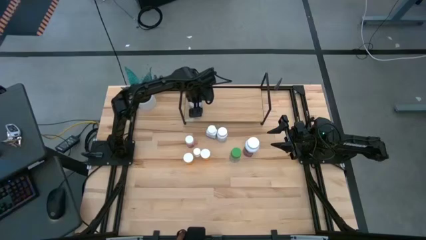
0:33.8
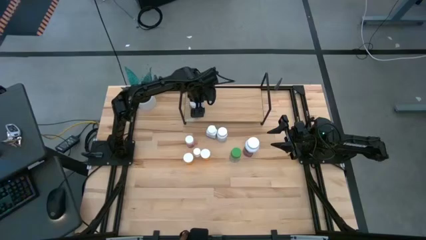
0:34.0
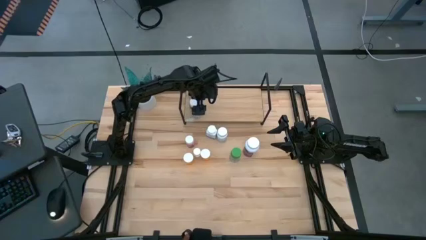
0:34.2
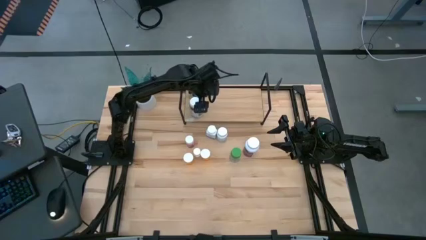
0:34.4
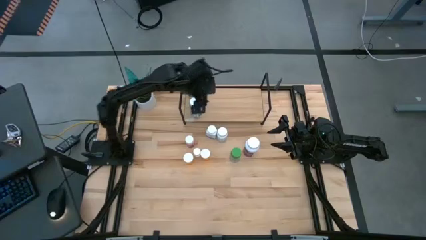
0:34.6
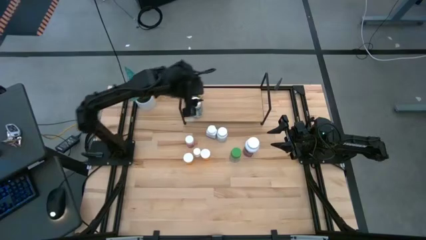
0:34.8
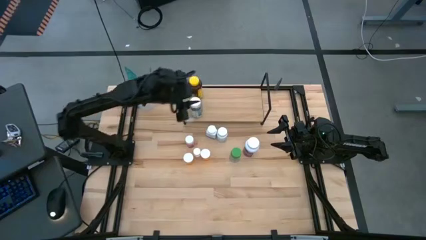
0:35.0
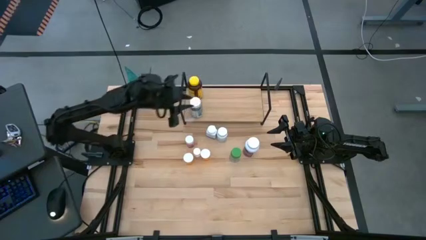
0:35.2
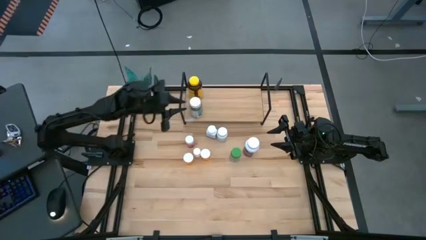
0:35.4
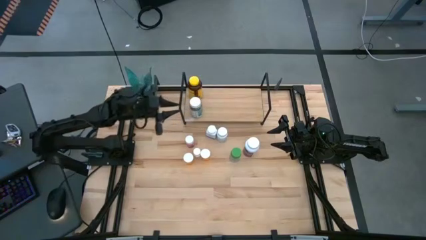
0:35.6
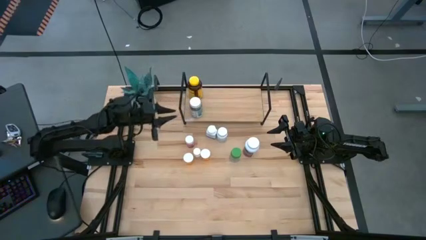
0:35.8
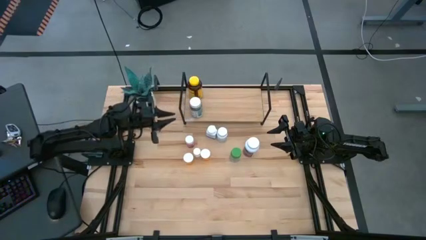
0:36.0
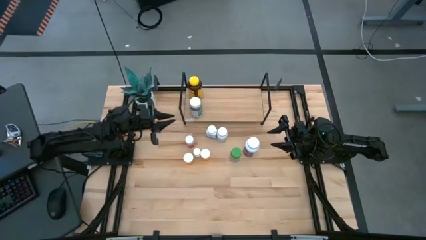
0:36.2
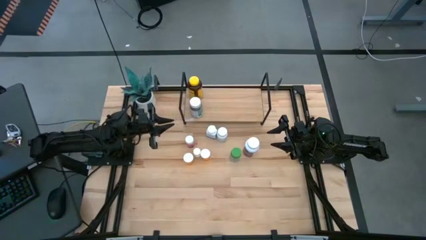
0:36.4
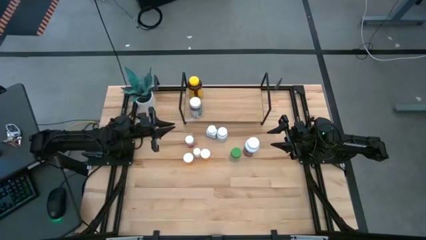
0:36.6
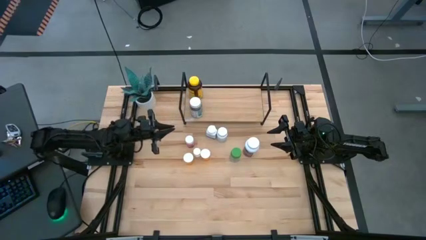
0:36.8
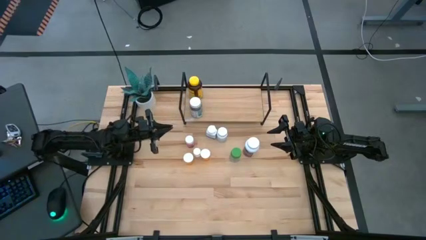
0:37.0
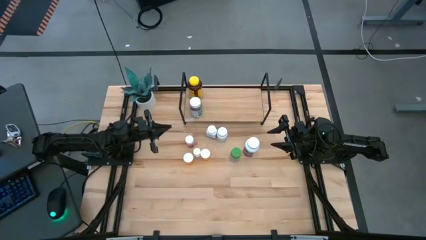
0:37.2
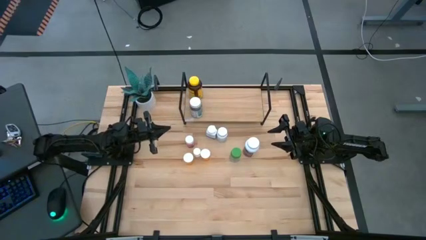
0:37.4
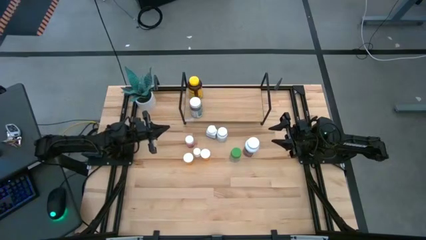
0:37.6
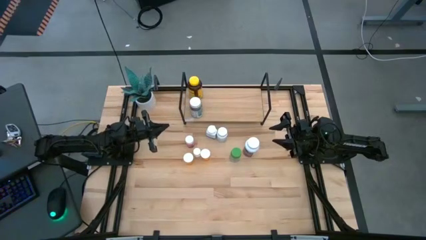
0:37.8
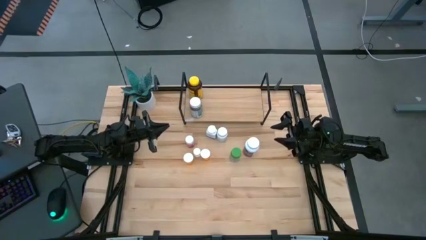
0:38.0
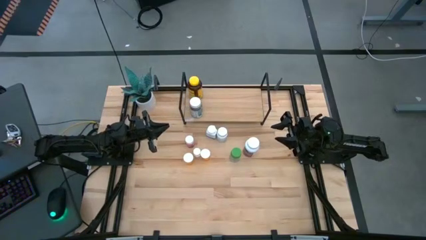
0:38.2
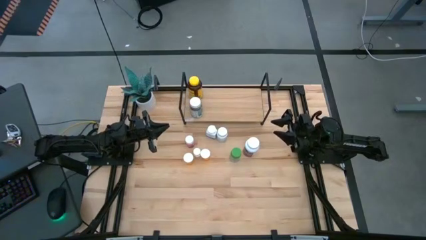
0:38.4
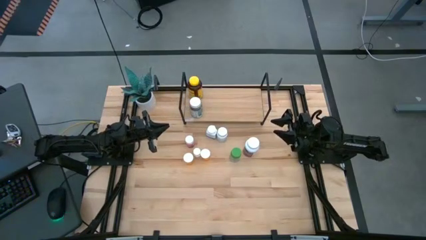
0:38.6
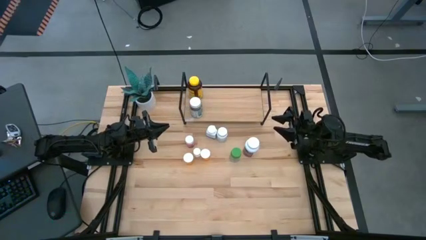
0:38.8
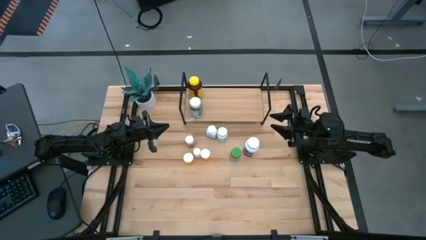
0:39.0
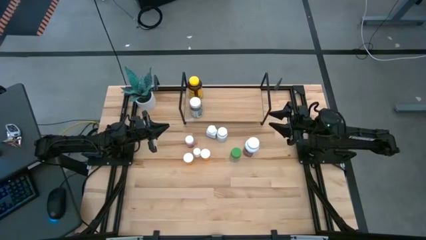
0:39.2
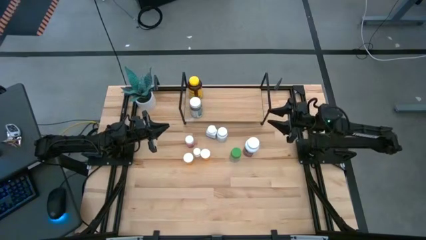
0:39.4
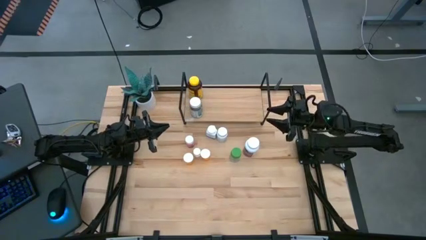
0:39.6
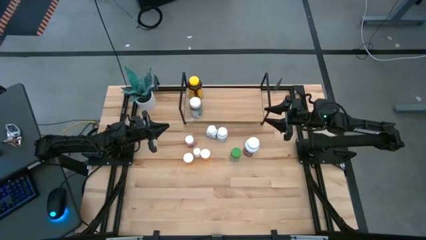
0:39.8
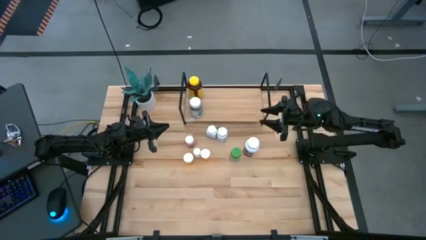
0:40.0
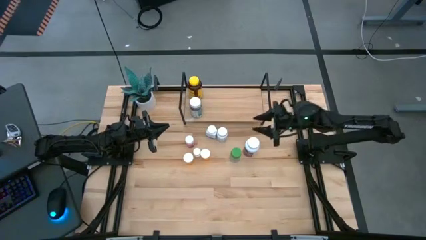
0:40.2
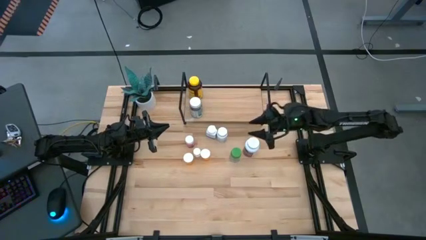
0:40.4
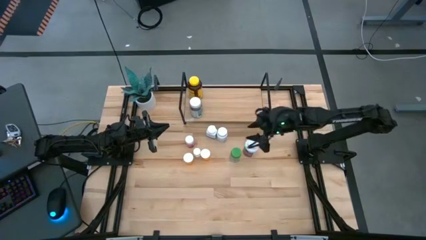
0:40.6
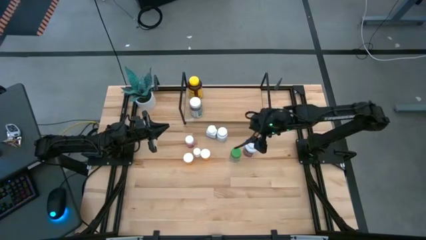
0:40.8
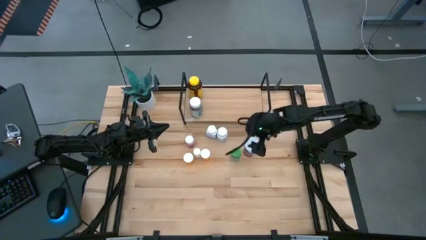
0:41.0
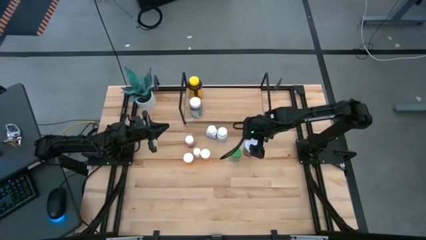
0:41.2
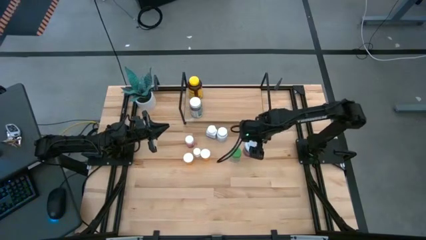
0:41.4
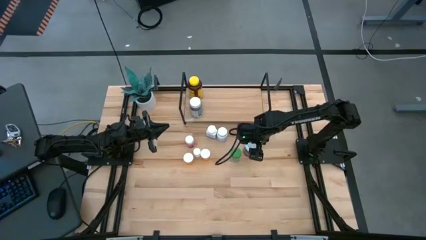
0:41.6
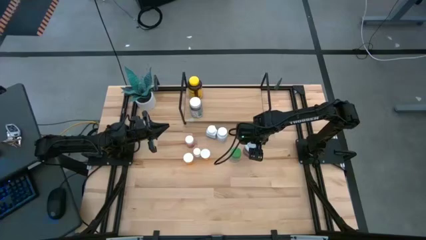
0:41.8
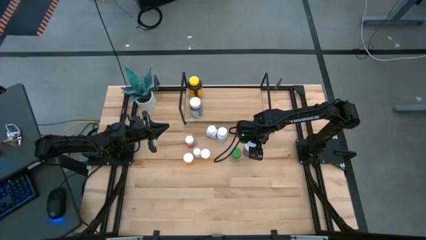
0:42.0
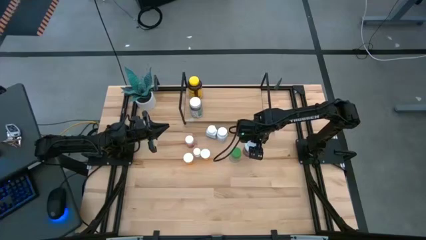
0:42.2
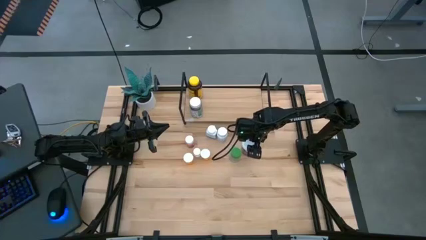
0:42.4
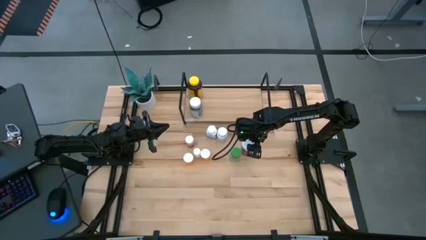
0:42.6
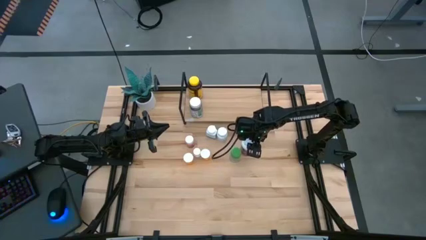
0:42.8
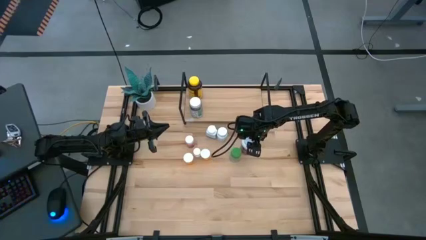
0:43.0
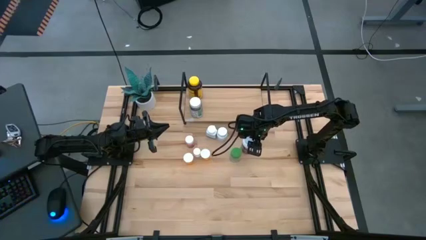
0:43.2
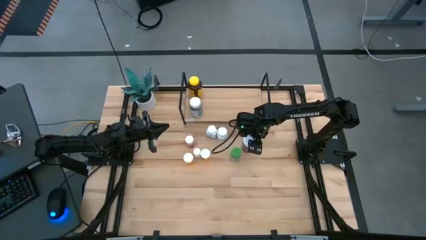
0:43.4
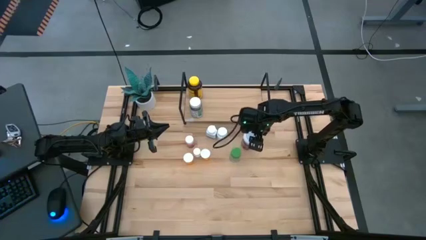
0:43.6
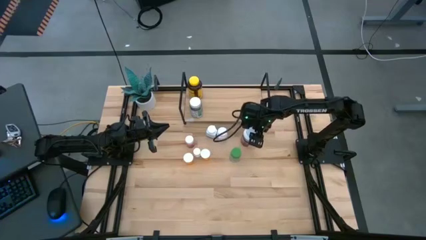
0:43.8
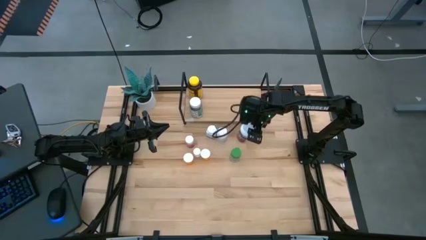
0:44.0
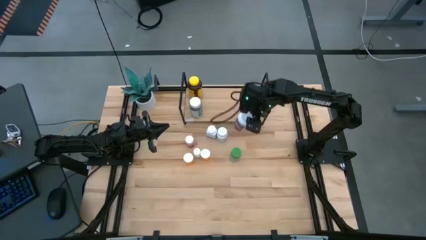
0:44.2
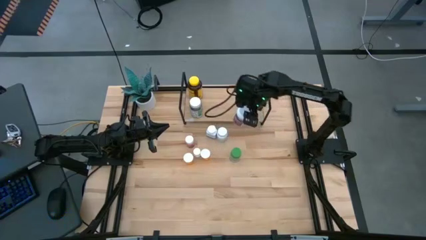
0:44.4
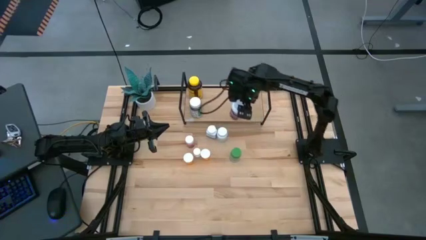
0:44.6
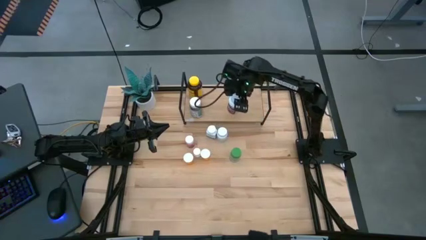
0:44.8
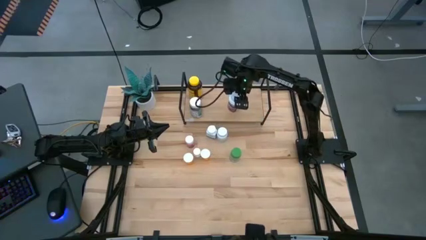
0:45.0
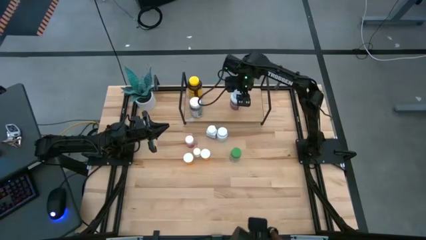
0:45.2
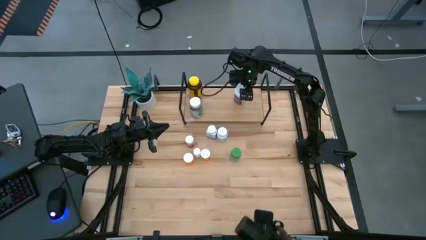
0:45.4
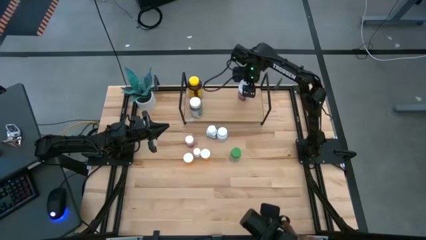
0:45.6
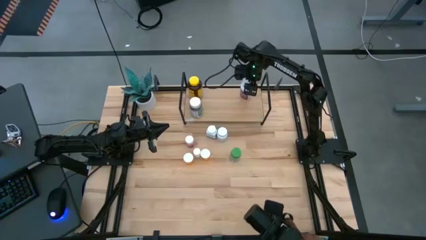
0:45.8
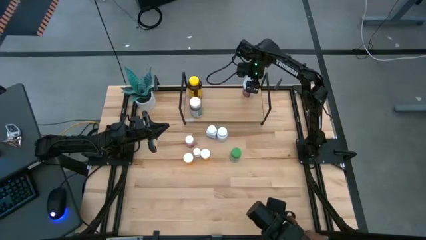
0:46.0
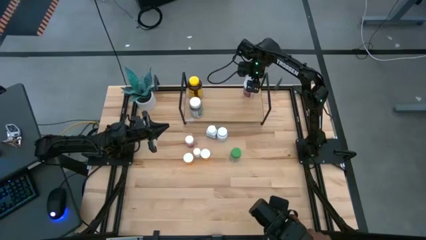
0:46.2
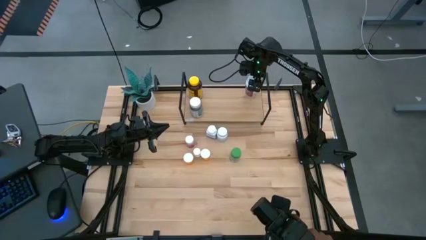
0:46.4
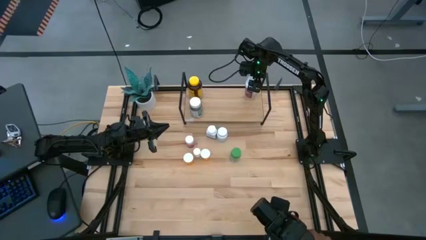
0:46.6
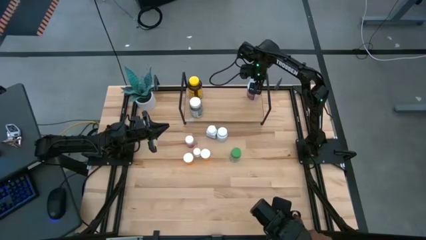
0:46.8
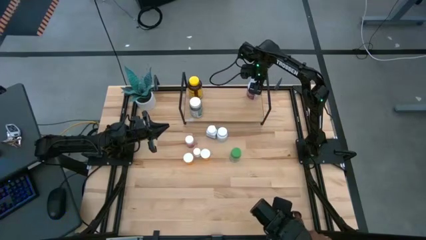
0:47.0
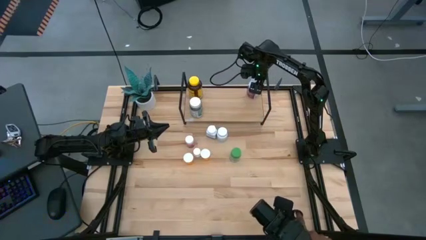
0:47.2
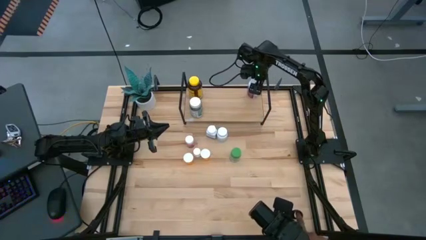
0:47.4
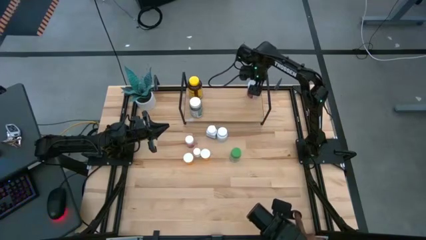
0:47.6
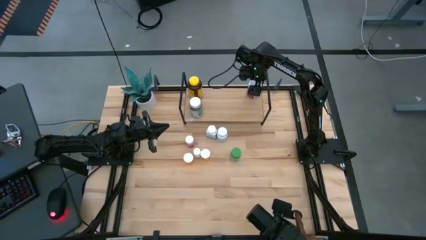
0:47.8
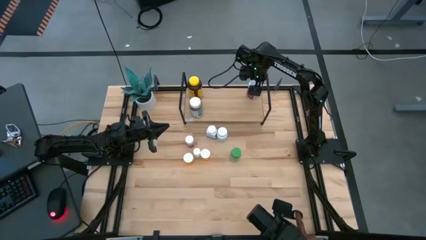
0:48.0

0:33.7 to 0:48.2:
Task: Pick and place medicine bottles onto shelf by color
Put the white violet medicine bottle on the shelf
